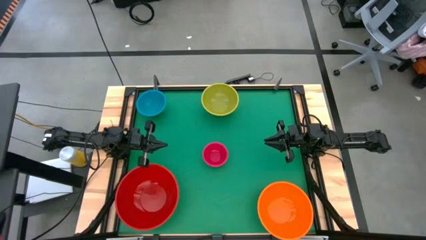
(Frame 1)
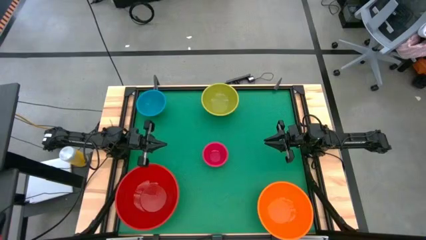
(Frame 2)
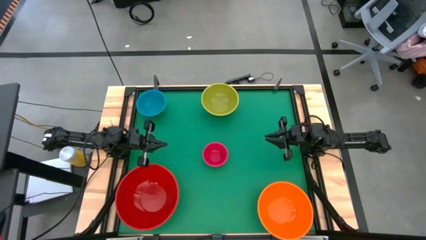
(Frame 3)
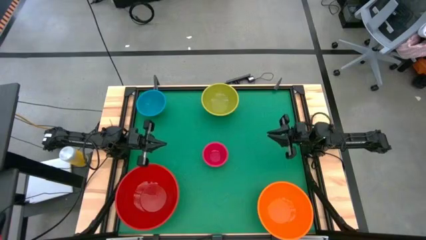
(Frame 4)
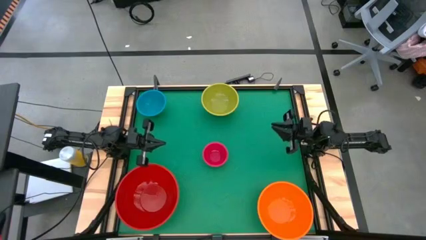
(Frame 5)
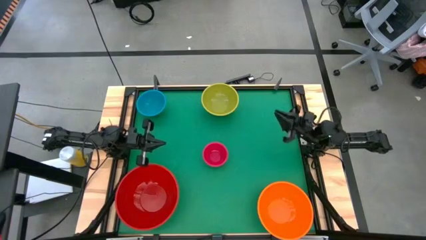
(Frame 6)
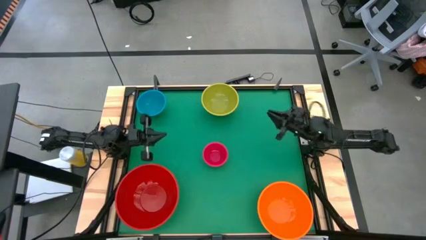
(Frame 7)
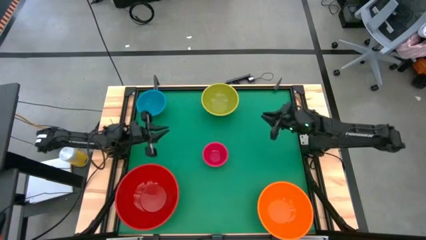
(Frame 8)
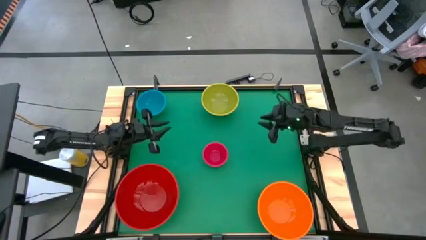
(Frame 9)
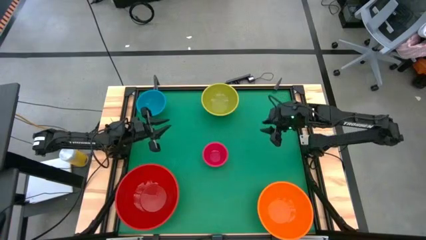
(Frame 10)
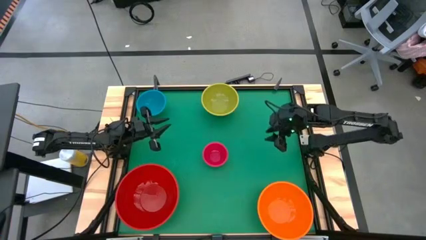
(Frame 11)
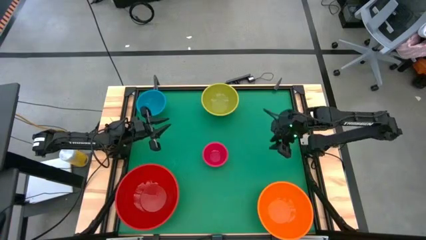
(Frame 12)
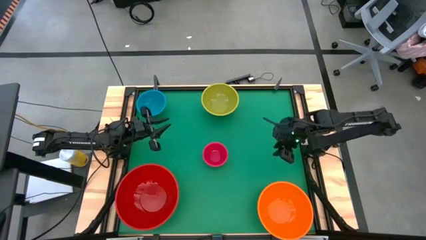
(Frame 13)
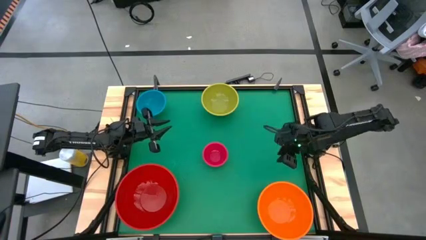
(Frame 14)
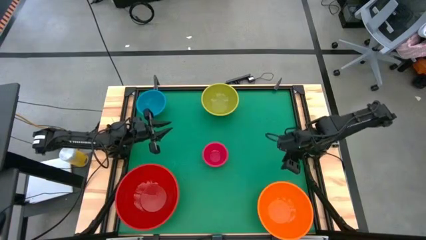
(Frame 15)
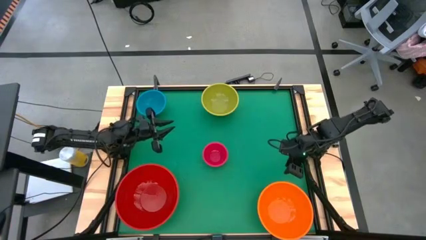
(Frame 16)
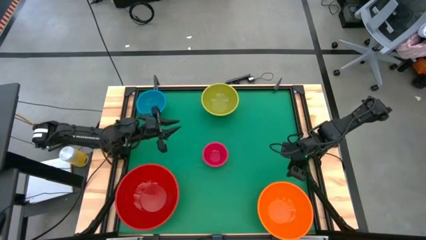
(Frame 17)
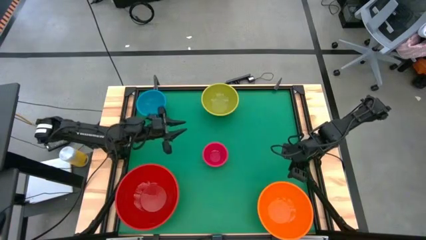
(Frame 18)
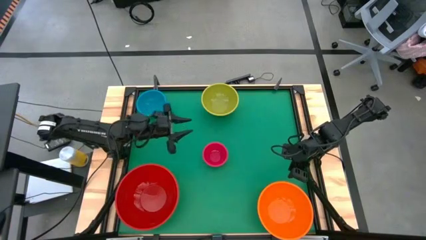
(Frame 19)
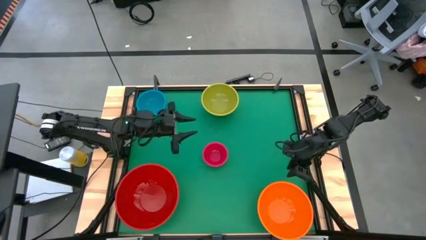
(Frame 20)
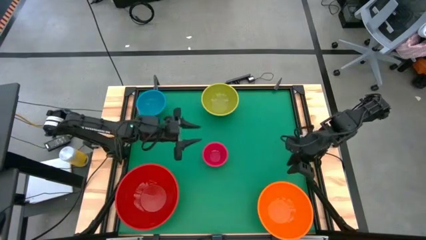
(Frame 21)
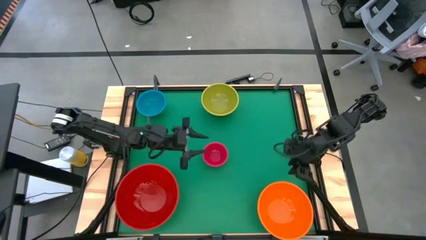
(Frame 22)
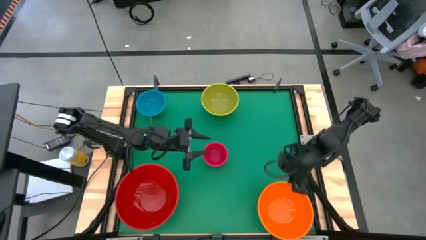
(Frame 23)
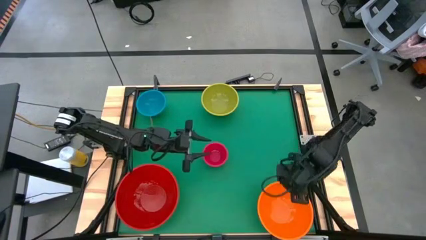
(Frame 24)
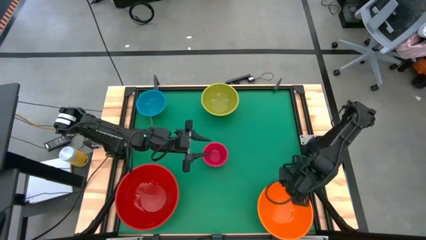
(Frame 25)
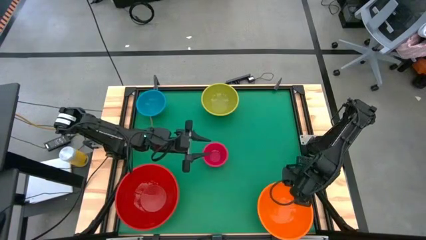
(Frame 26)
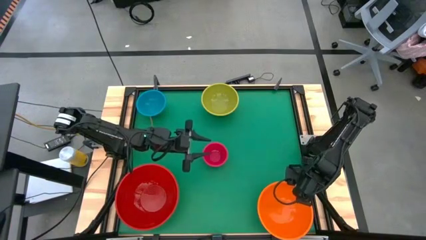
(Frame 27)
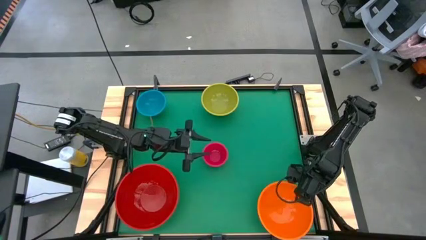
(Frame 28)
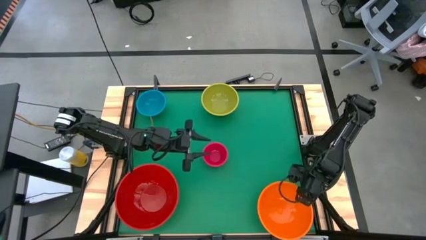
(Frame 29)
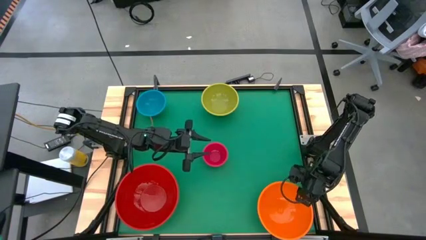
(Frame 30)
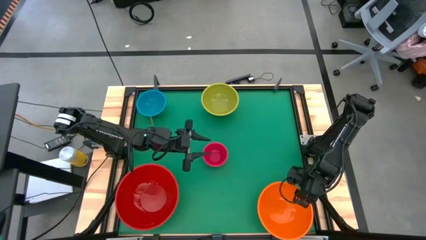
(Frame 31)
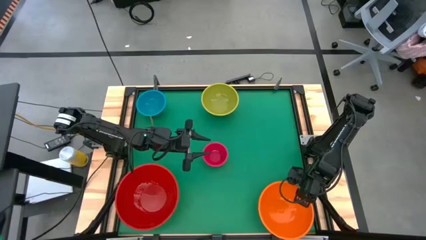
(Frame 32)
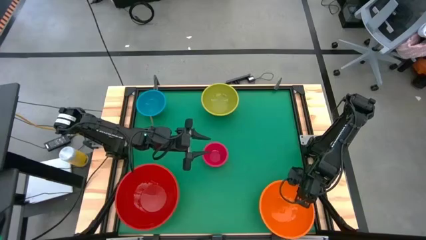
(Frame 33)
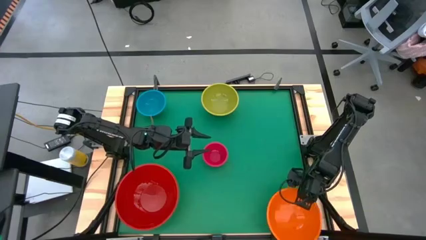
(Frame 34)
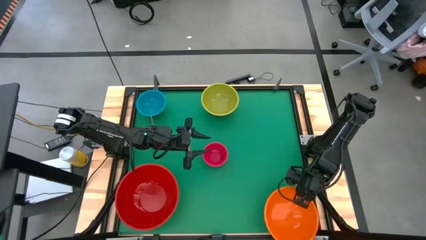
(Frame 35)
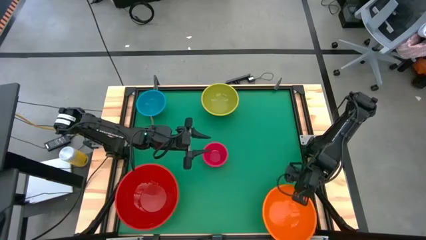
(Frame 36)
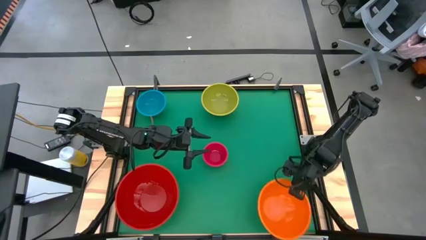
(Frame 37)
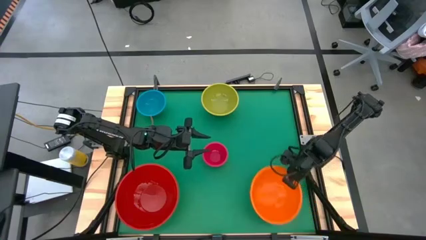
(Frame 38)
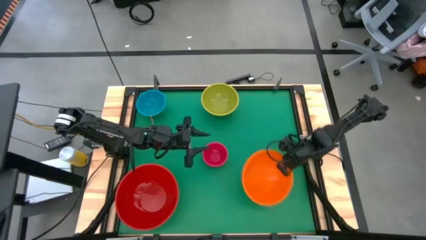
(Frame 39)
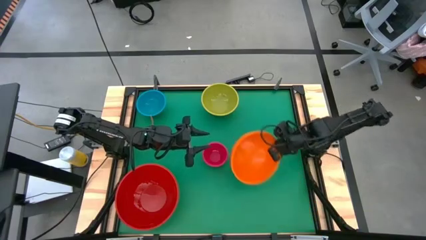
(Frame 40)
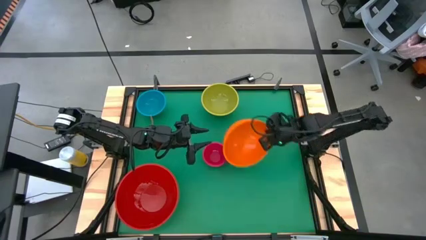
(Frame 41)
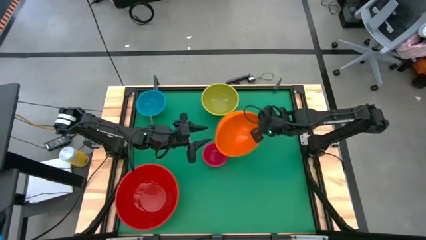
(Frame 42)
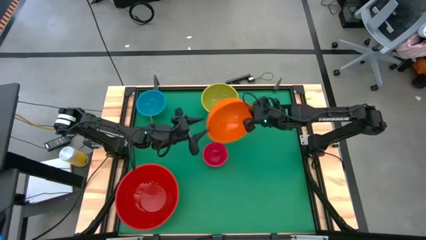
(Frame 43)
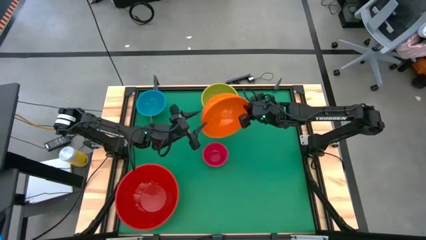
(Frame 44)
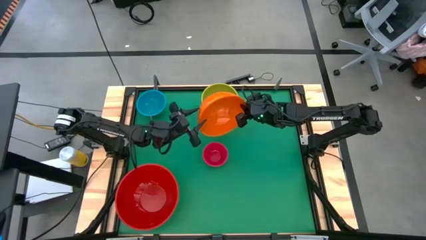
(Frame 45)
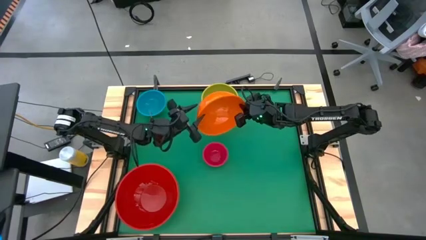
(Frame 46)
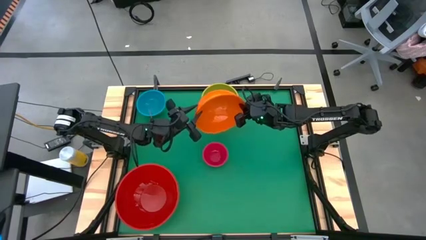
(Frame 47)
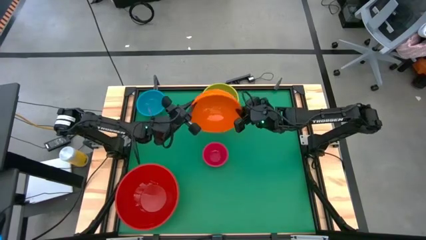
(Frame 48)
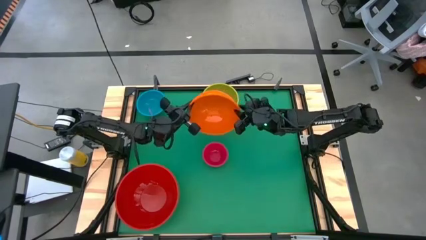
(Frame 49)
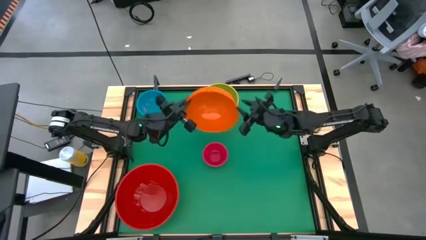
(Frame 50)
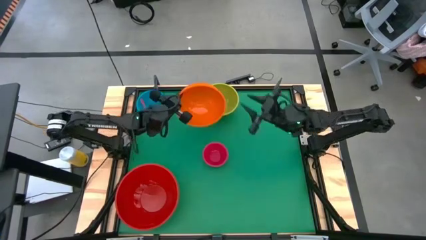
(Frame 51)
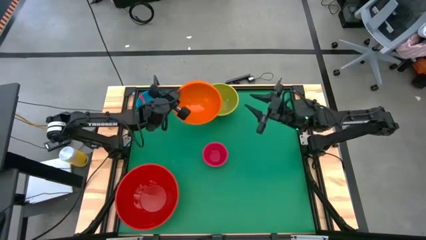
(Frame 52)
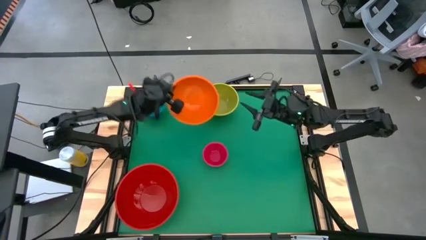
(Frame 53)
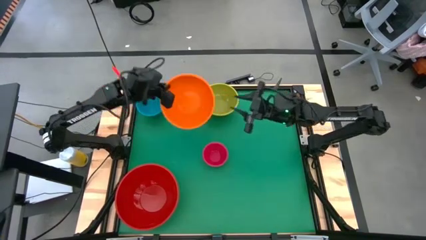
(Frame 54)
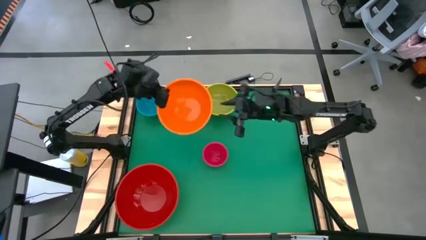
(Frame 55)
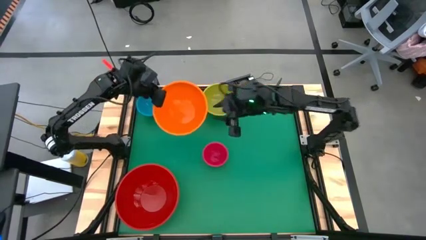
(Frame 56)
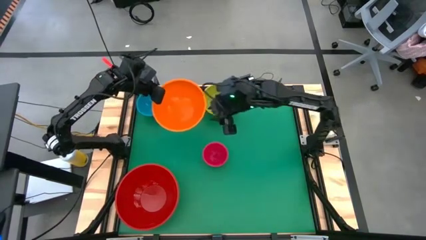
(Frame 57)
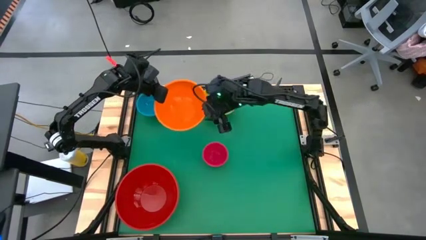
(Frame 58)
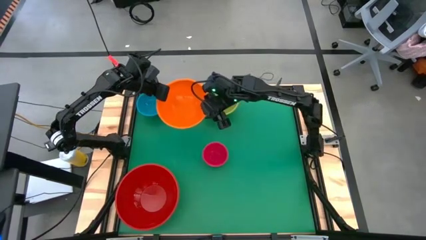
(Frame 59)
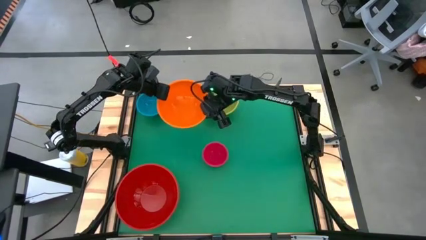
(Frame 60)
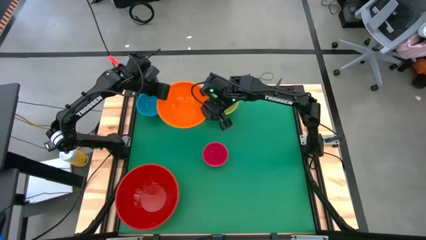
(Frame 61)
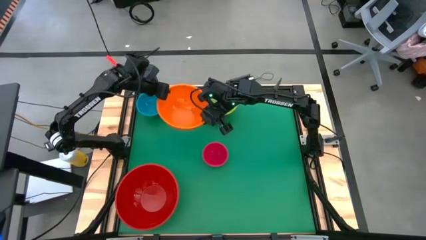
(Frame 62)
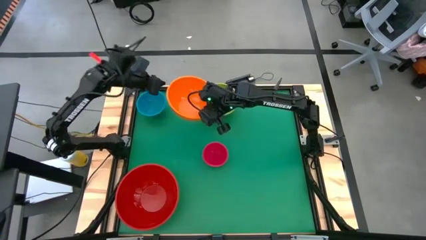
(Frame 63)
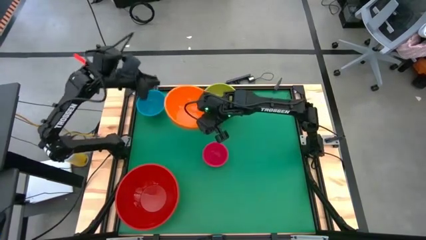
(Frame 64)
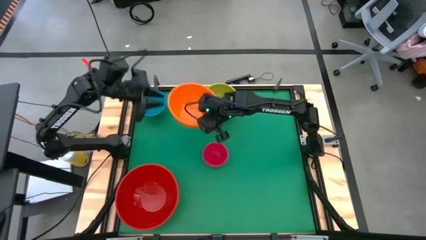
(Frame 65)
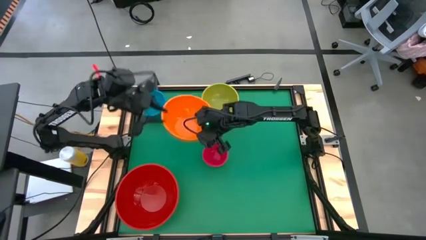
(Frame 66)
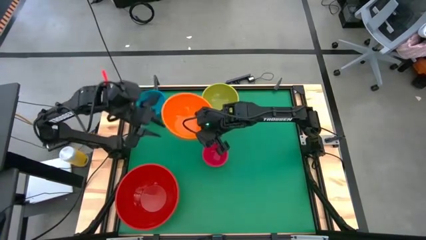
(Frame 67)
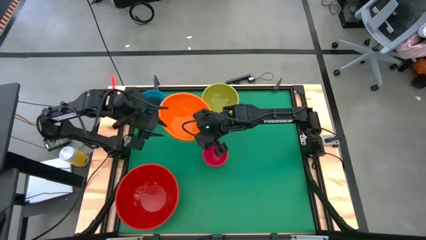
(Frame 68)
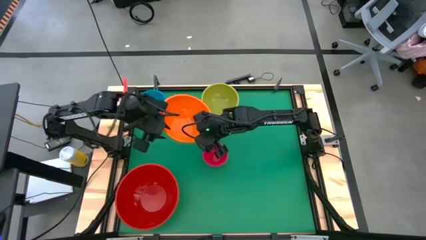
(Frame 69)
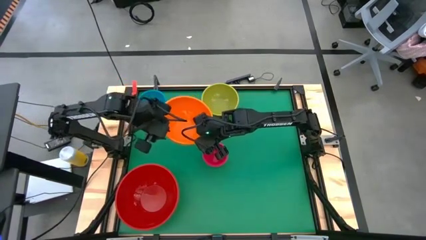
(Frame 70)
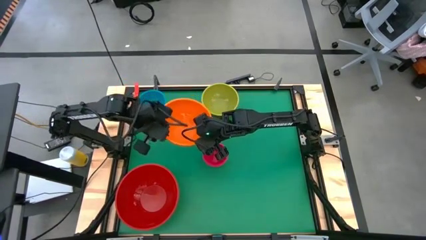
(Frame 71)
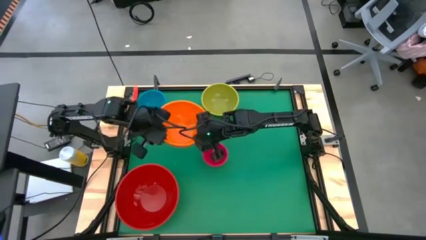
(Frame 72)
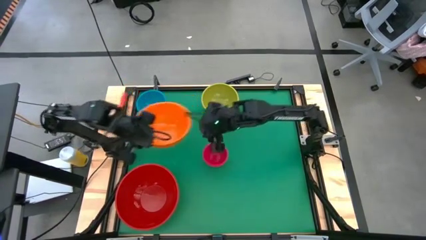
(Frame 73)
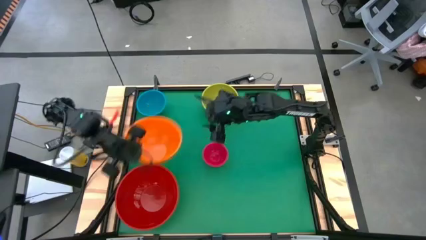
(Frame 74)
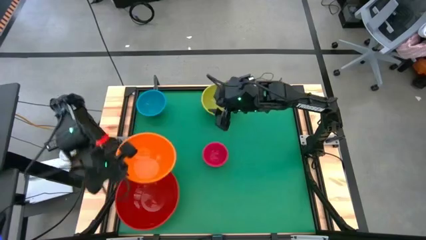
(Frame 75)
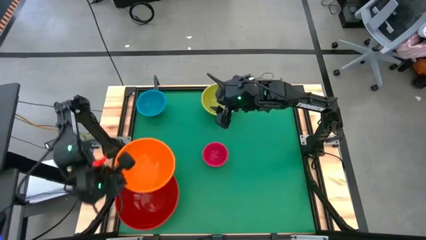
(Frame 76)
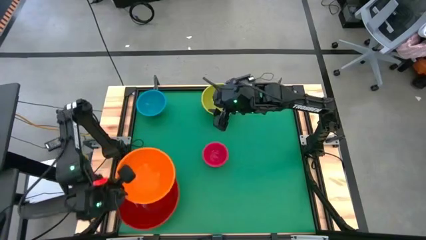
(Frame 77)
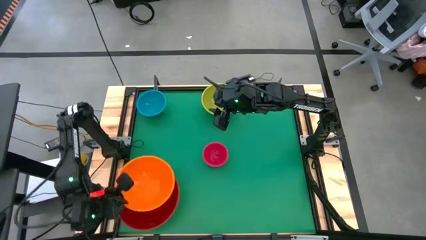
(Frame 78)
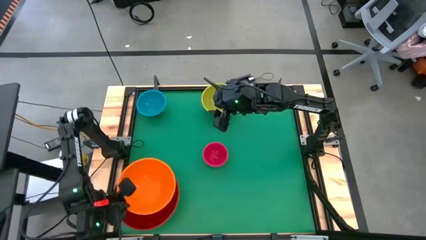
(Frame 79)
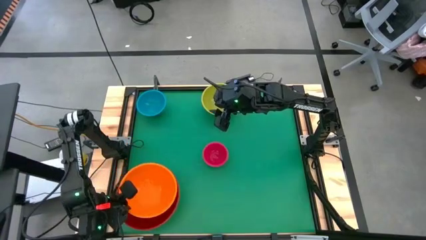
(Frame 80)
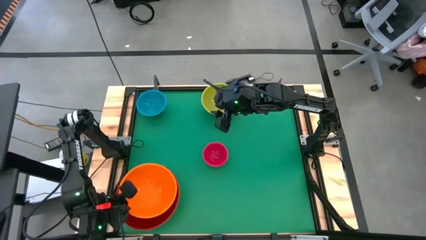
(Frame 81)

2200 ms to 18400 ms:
Stack the orange bowl into the top of the red bowl
